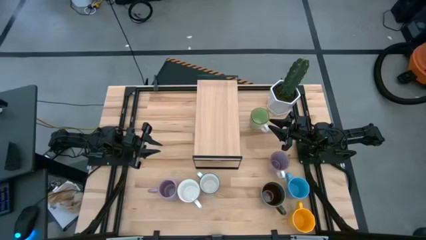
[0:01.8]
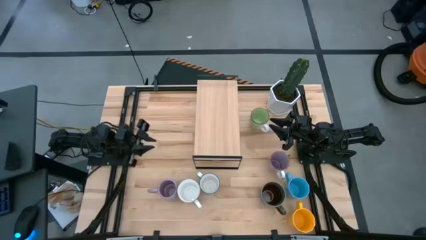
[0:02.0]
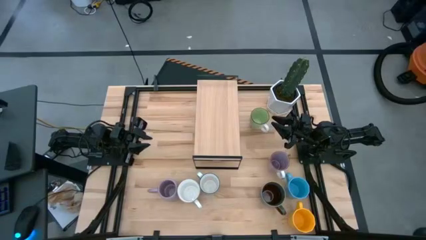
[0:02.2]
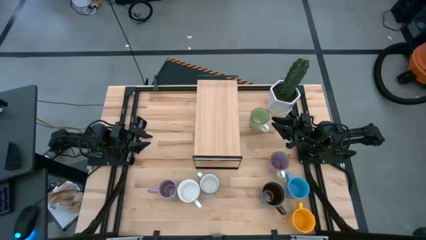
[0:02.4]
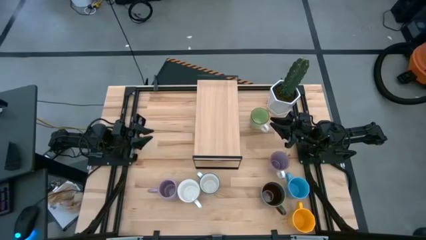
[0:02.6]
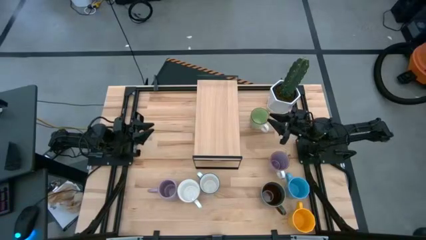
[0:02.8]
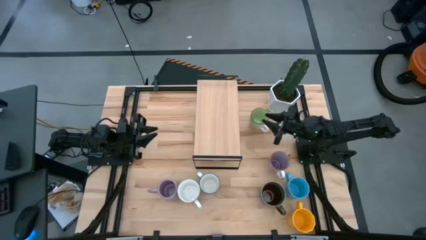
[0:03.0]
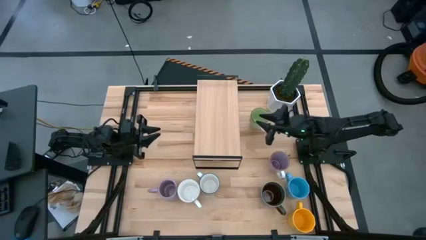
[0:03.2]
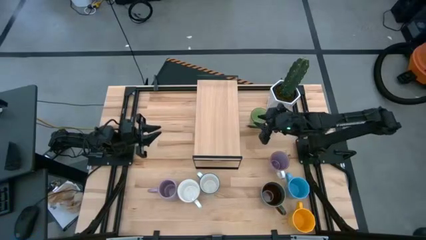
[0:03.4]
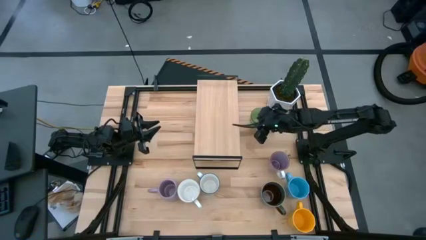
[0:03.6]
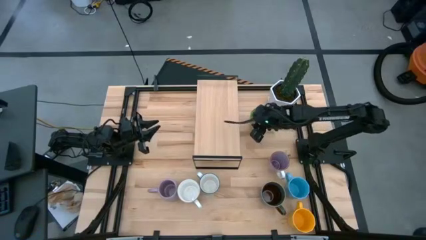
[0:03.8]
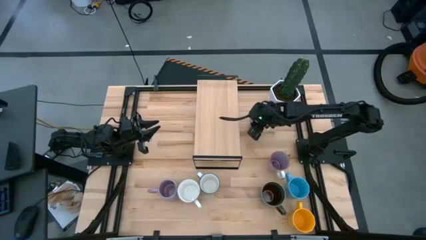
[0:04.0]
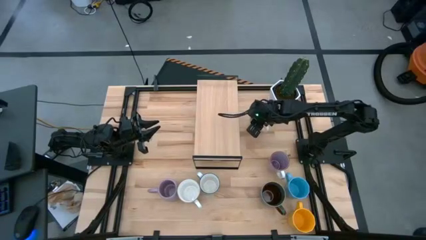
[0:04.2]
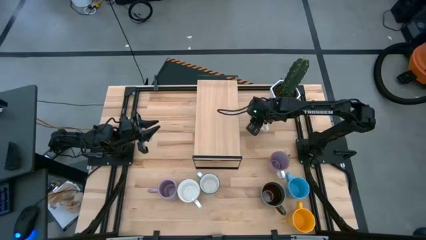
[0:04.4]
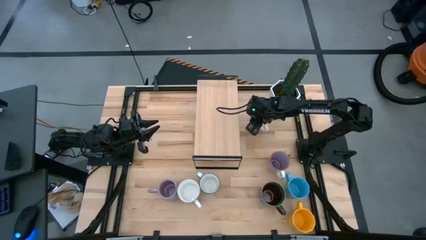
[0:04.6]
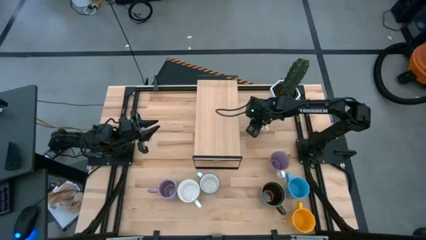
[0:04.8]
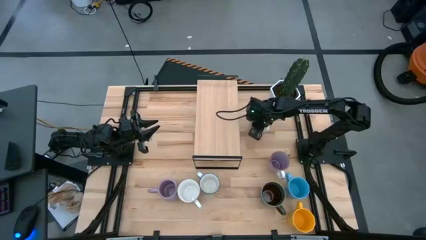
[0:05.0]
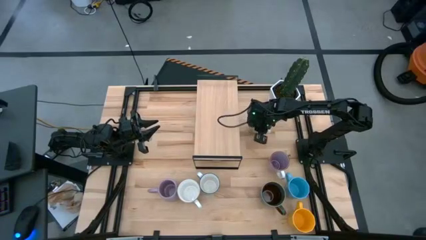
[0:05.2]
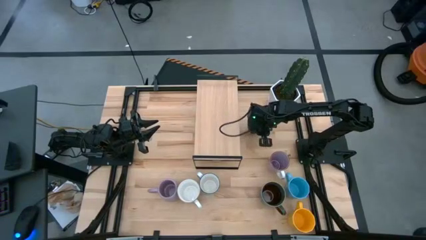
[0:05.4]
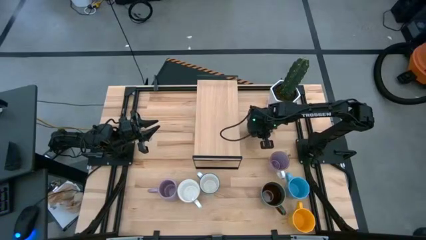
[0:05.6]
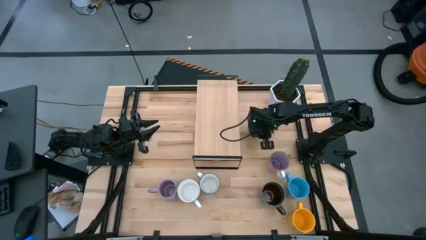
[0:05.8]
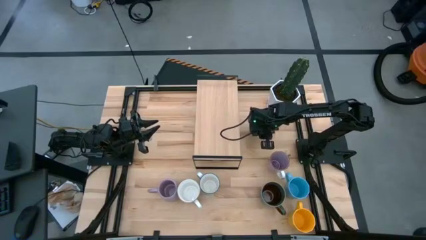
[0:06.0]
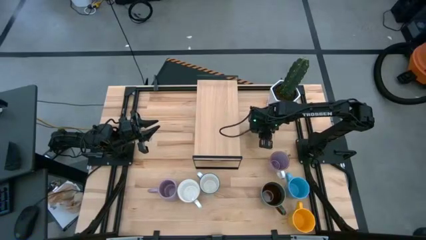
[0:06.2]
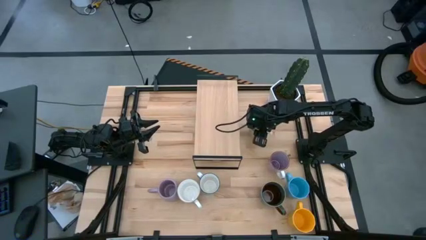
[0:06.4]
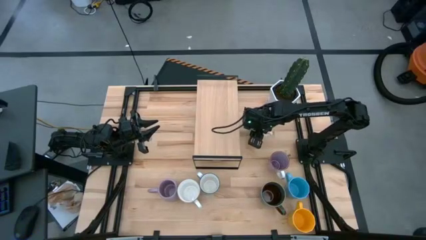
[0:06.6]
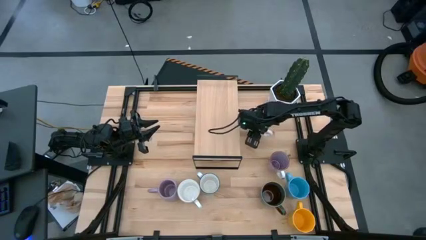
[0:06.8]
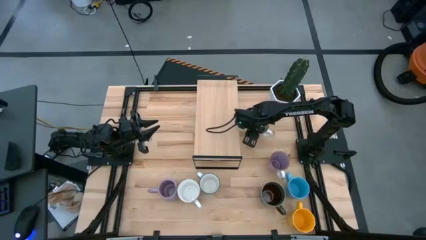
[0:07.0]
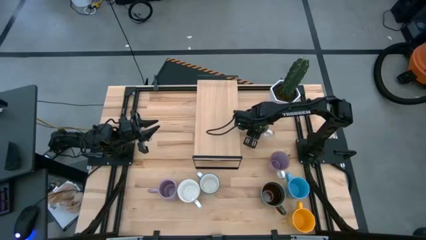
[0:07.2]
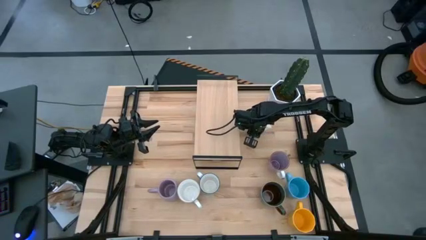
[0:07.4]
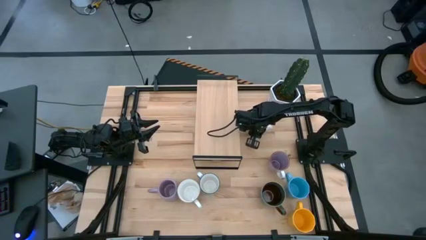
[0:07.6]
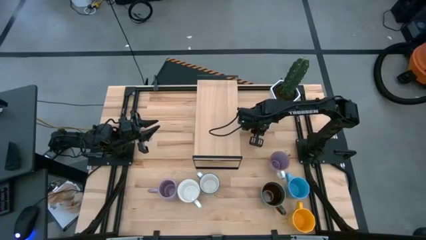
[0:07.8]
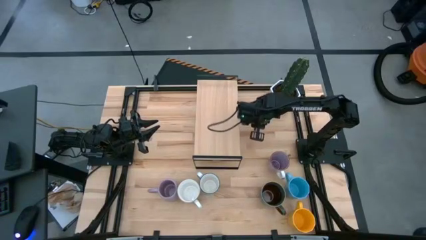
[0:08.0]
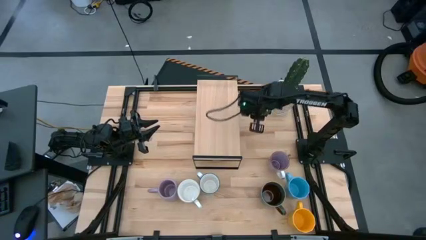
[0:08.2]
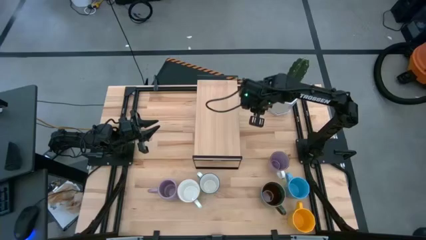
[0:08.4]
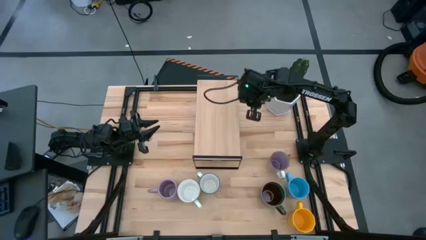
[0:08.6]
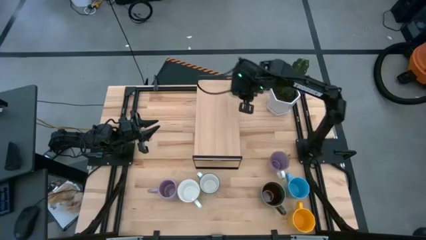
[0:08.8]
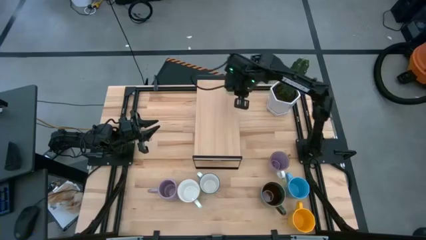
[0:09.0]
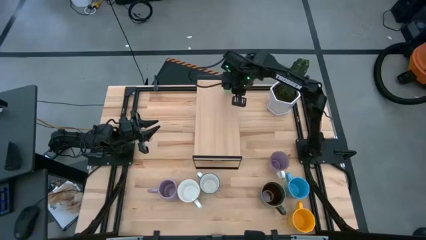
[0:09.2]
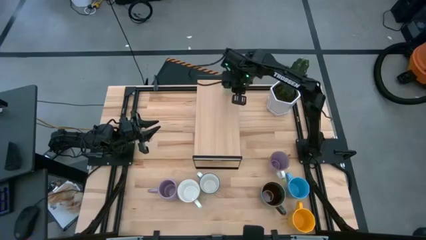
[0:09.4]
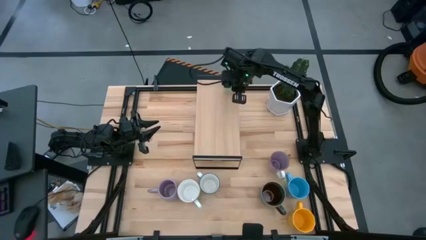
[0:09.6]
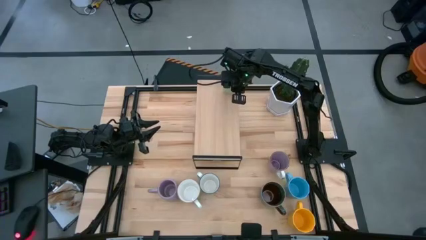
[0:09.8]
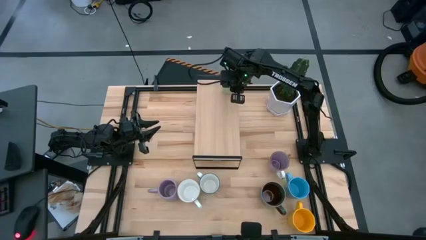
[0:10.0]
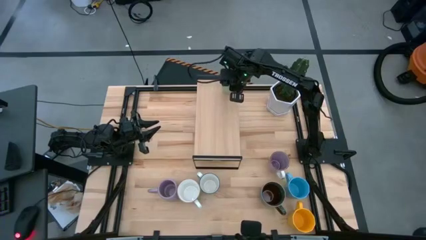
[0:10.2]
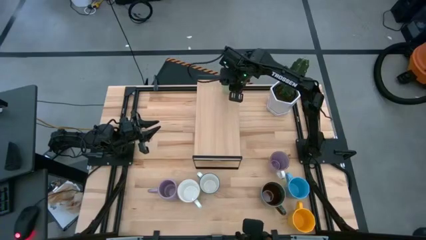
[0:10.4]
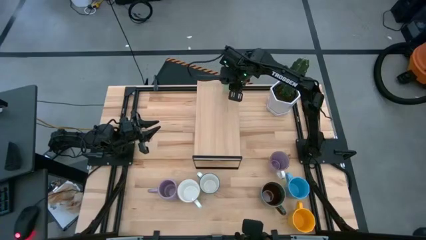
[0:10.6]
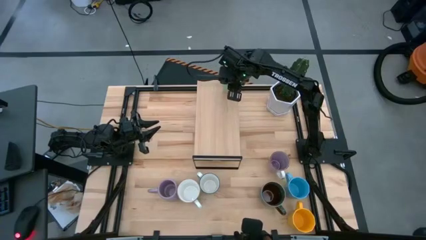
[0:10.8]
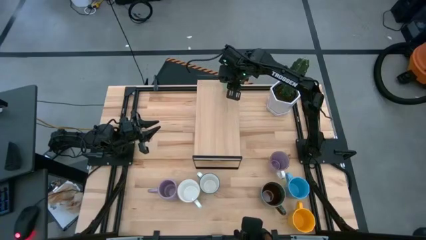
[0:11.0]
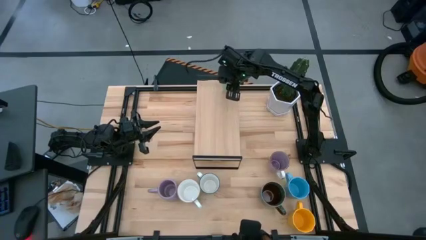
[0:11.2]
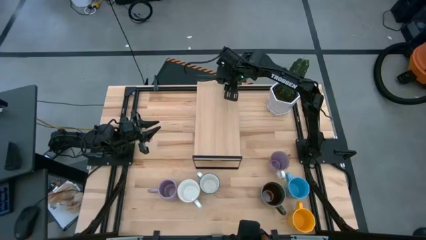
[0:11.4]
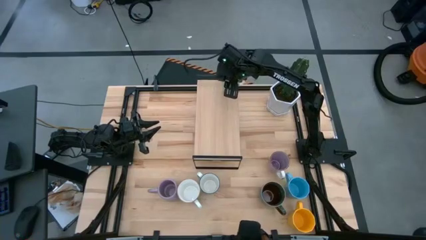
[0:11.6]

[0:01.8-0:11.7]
Task: Place coffee mugs
Put the green mug on the shelf

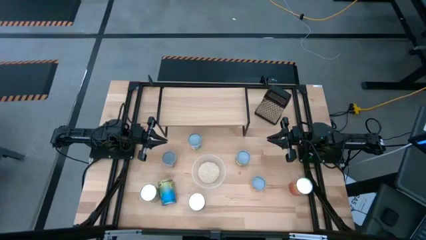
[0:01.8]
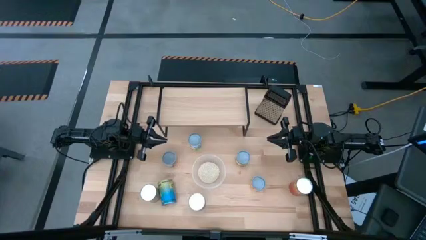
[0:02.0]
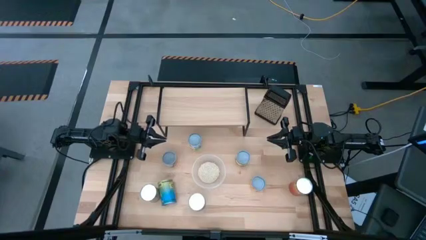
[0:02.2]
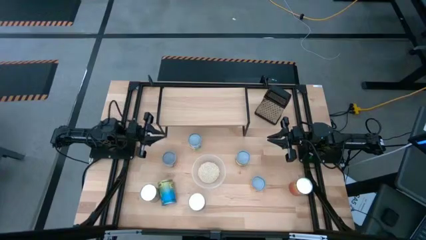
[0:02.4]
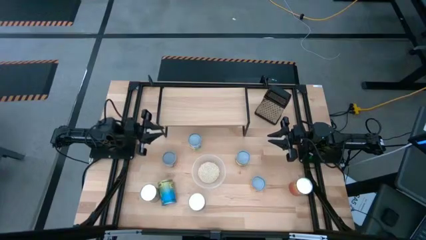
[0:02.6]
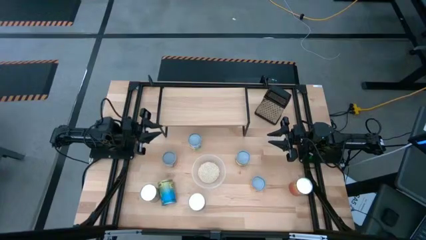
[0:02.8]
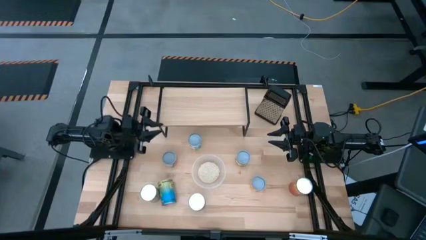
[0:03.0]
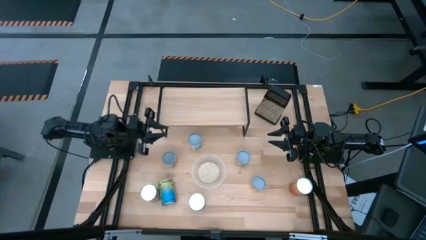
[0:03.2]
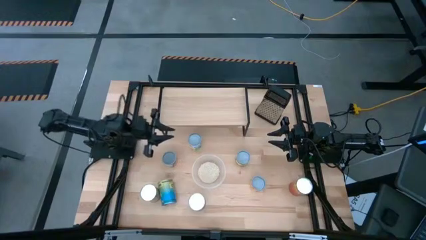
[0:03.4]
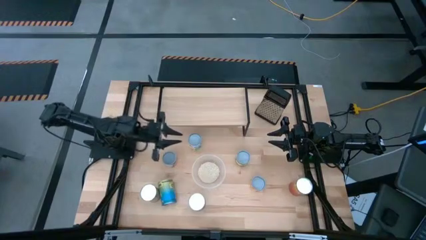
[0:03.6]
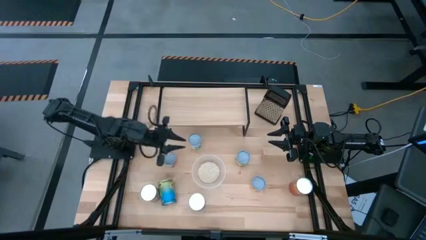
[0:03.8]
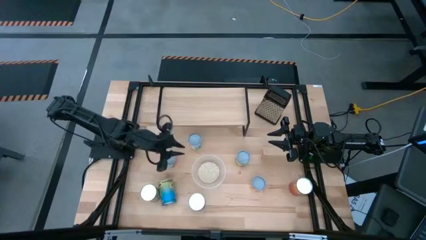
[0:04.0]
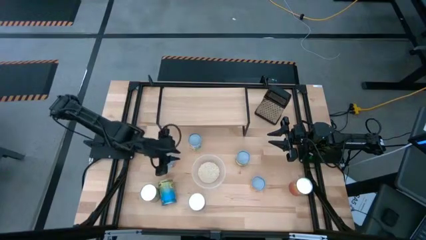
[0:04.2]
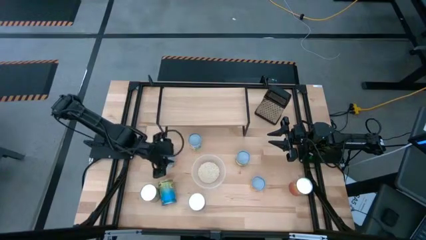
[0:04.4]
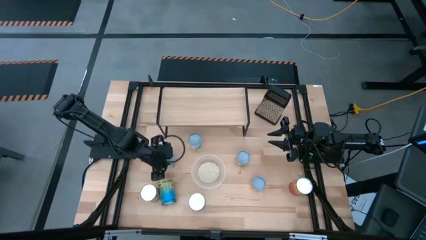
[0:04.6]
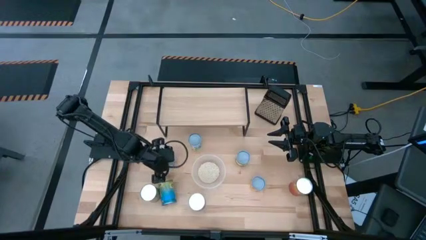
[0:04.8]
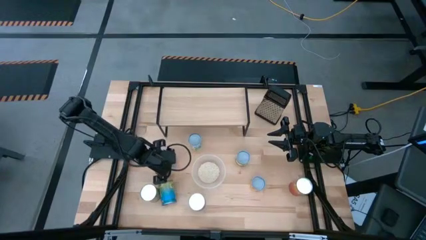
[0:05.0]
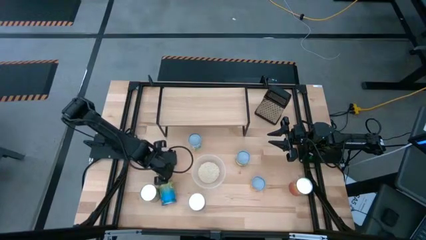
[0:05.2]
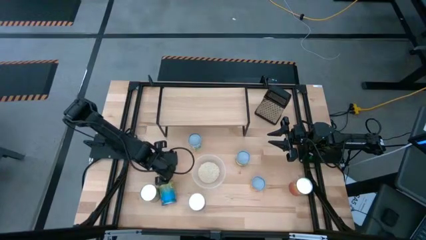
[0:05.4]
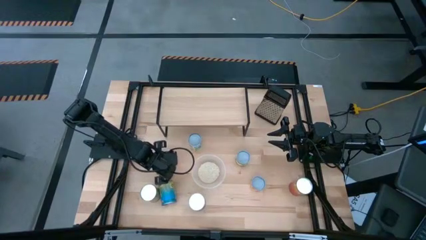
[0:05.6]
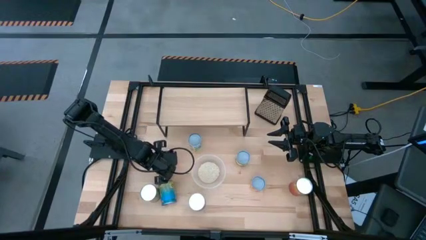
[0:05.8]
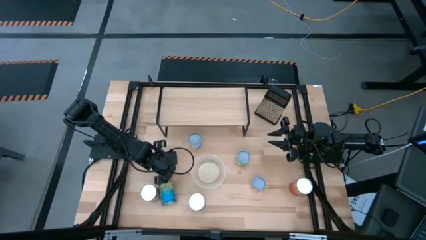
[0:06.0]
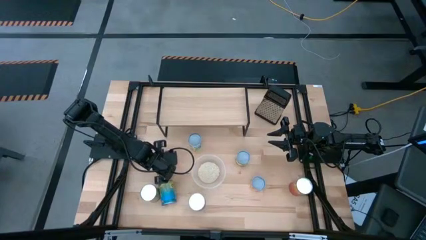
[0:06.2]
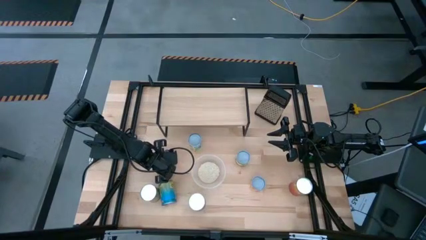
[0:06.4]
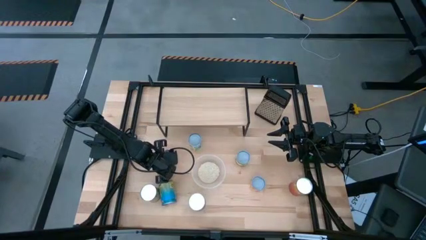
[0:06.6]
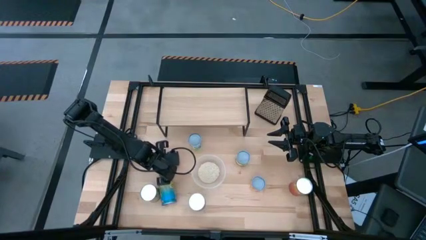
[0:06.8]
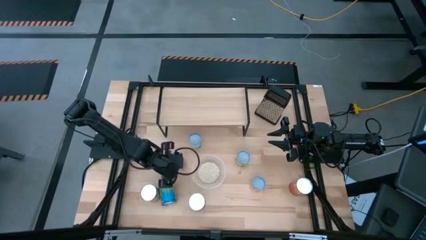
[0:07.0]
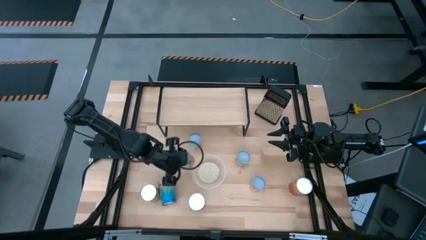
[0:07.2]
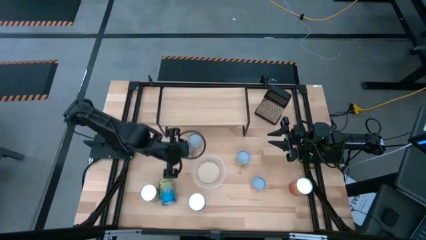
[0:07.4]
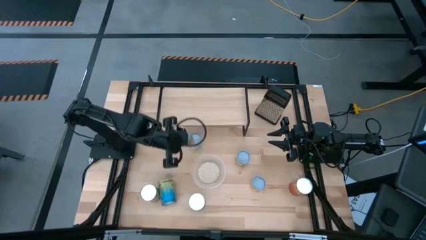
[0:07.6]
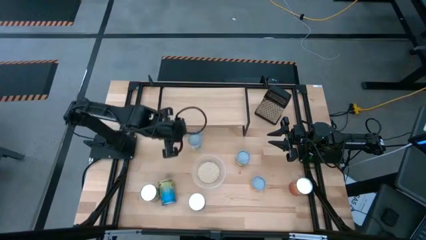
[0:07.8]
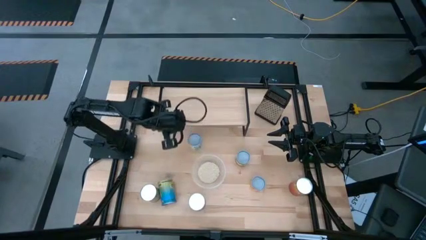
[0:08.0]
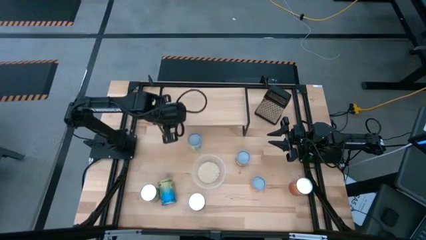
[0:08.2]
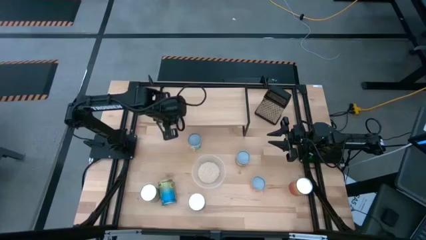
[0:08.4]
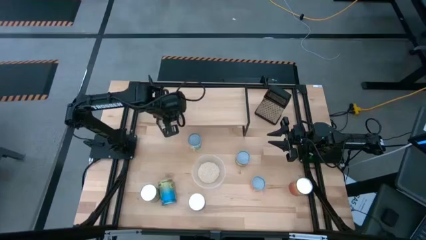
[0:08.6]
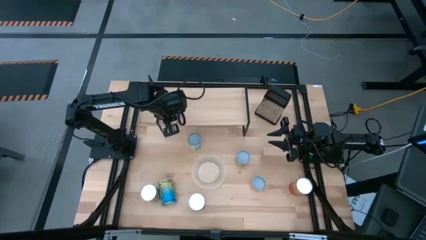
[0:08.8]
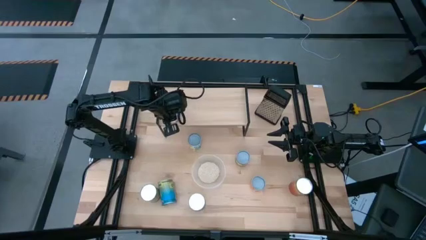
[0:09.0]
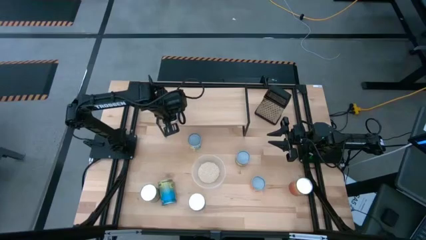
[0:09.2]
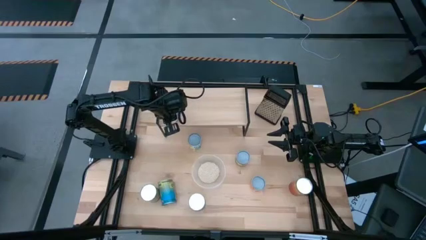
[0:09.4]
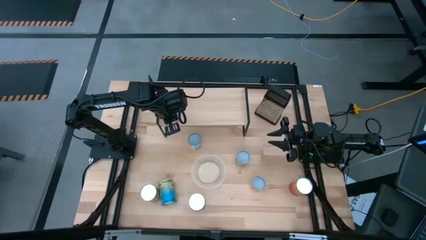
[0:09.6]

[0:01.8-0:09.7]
Task: Pick and place cans onto a shelf
Put the small canned oranges on the shelf
